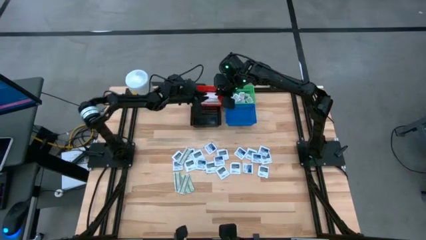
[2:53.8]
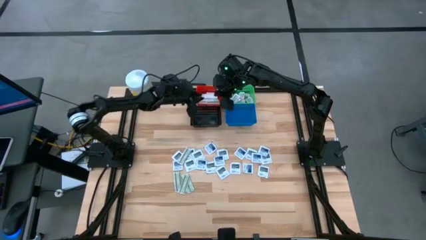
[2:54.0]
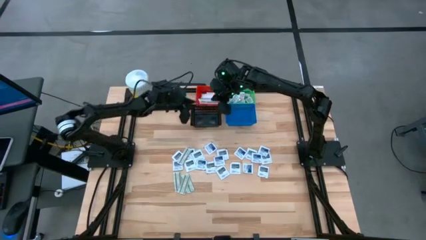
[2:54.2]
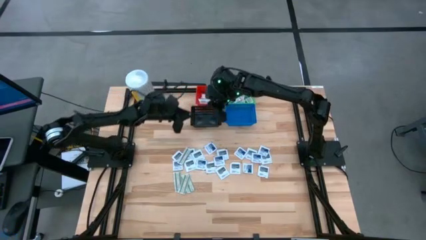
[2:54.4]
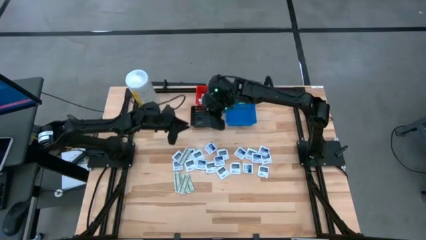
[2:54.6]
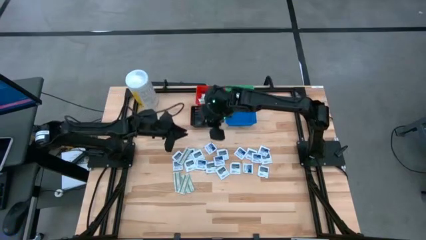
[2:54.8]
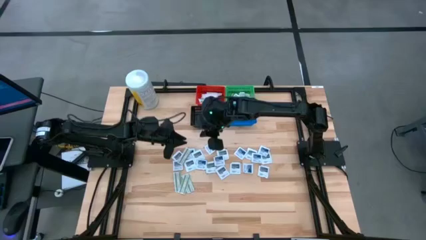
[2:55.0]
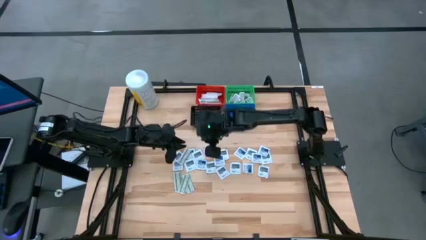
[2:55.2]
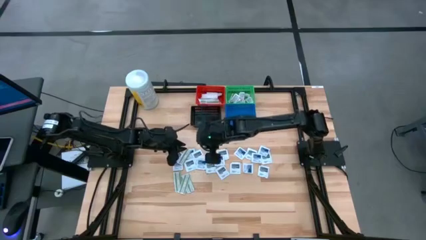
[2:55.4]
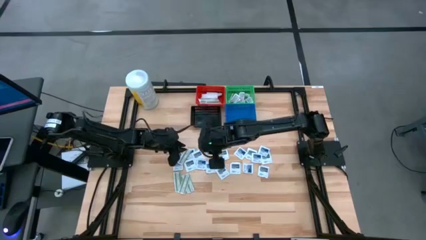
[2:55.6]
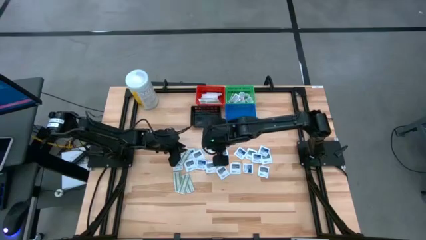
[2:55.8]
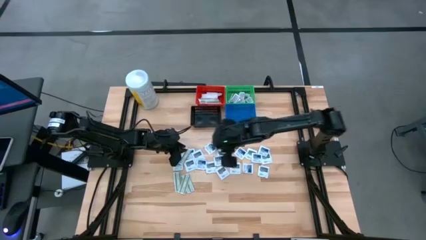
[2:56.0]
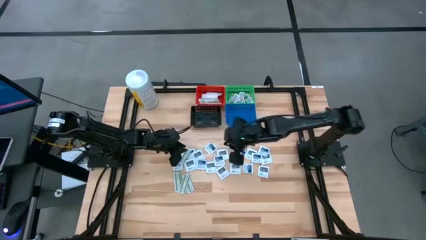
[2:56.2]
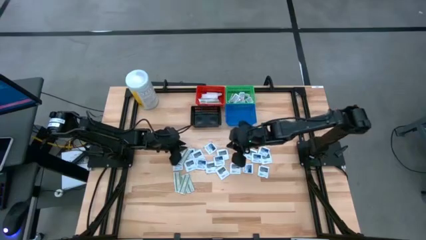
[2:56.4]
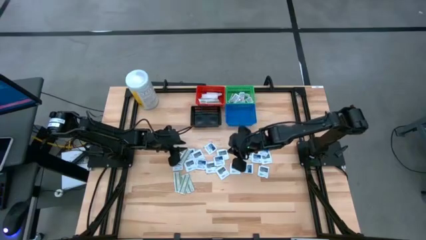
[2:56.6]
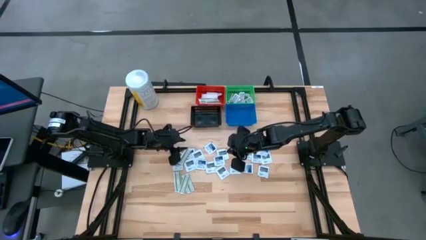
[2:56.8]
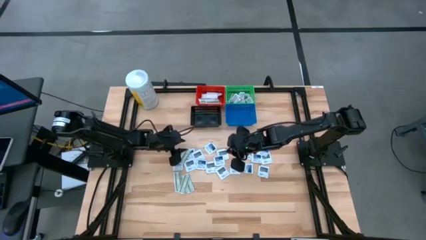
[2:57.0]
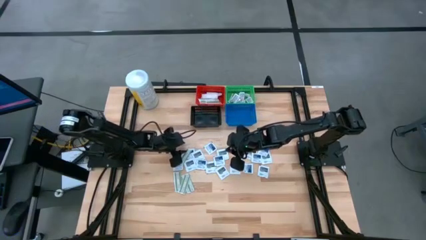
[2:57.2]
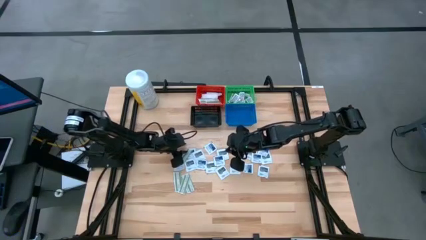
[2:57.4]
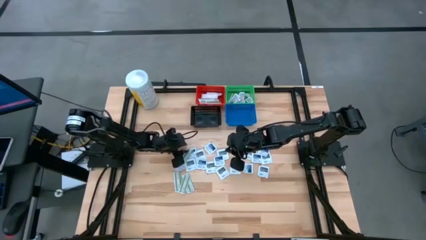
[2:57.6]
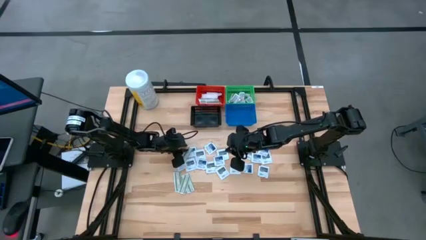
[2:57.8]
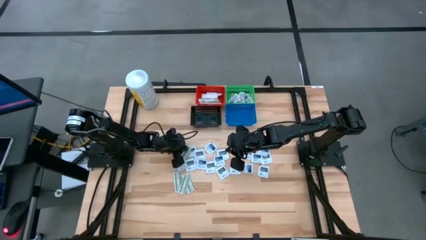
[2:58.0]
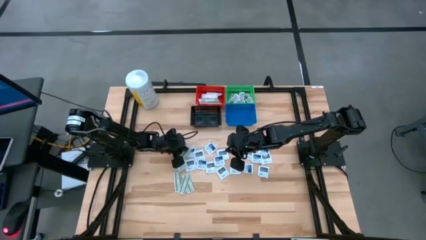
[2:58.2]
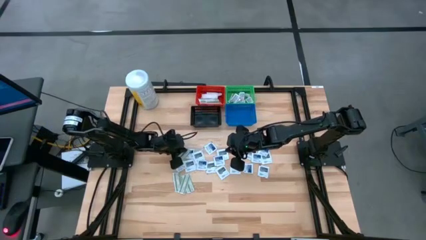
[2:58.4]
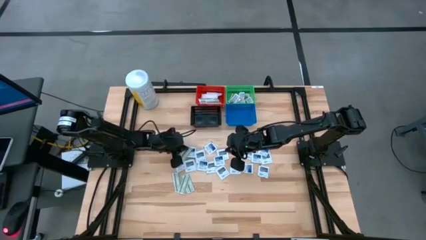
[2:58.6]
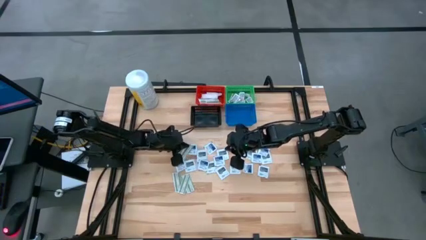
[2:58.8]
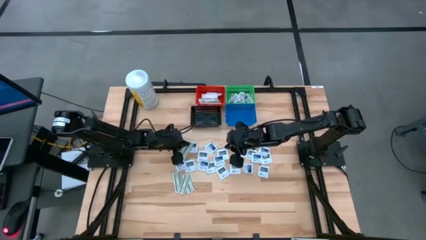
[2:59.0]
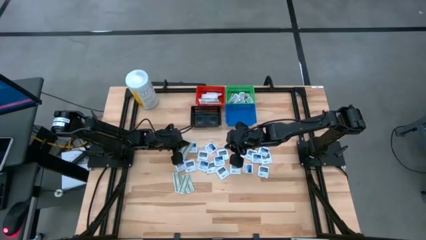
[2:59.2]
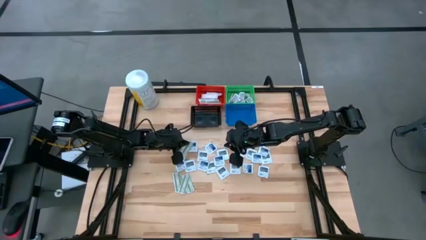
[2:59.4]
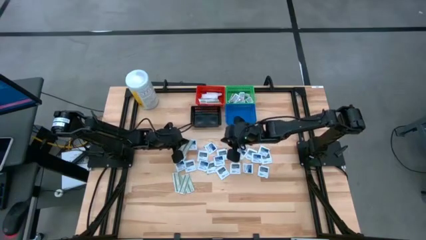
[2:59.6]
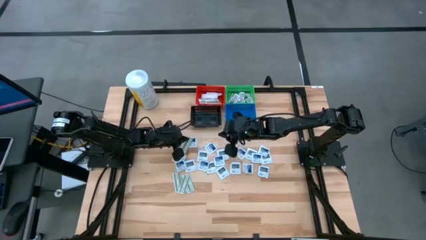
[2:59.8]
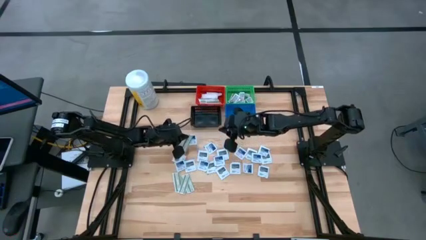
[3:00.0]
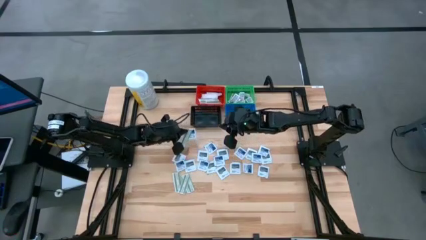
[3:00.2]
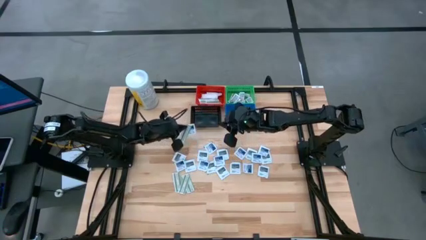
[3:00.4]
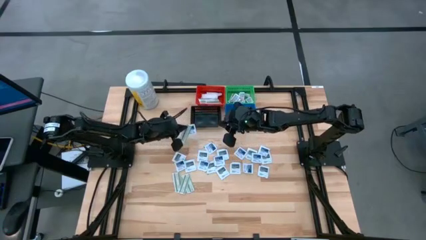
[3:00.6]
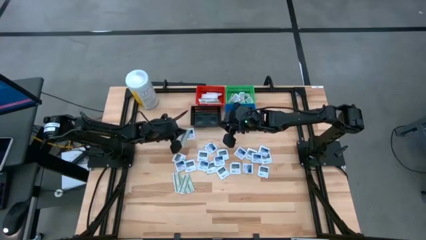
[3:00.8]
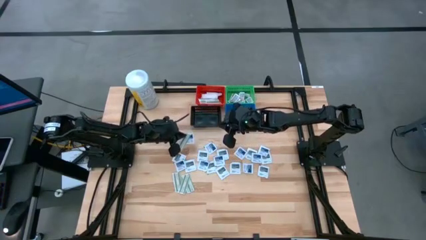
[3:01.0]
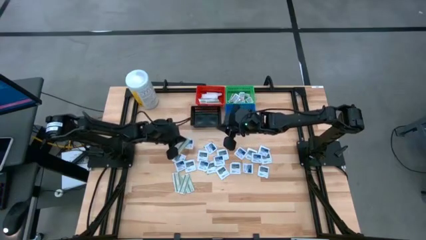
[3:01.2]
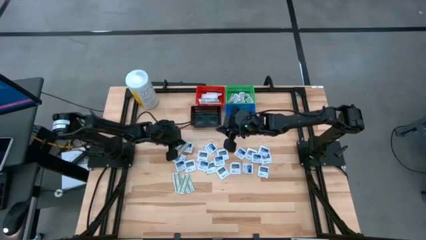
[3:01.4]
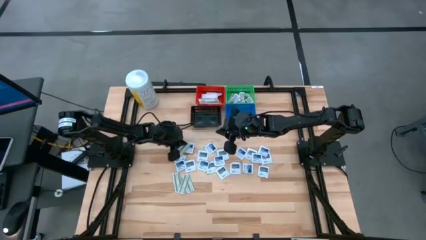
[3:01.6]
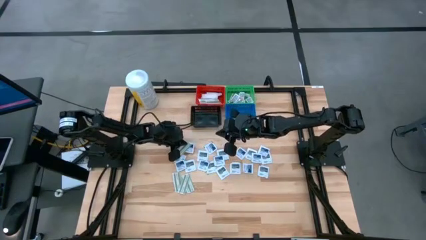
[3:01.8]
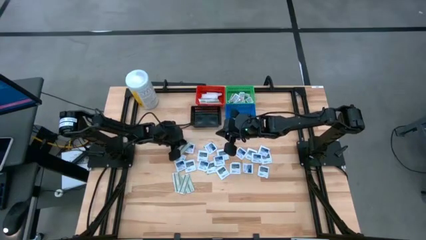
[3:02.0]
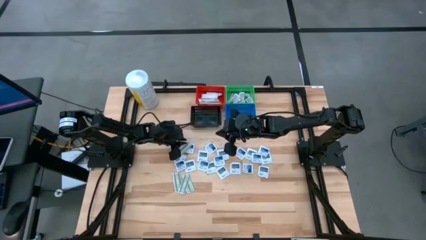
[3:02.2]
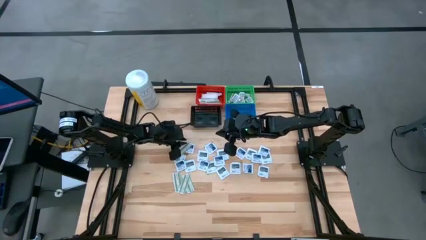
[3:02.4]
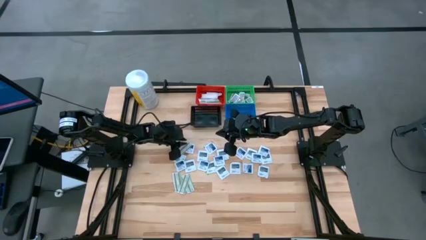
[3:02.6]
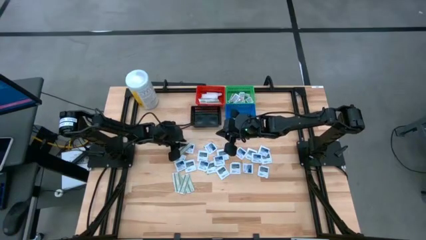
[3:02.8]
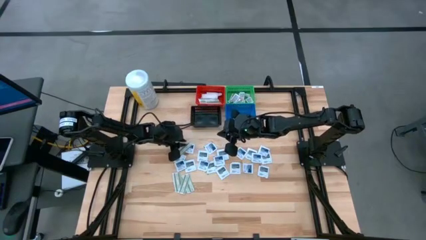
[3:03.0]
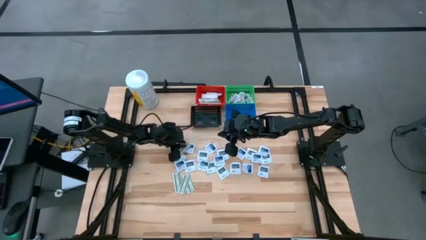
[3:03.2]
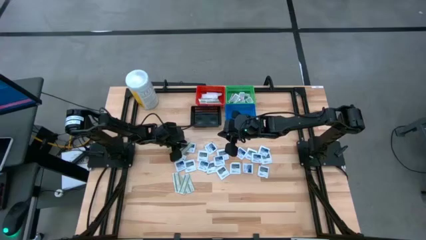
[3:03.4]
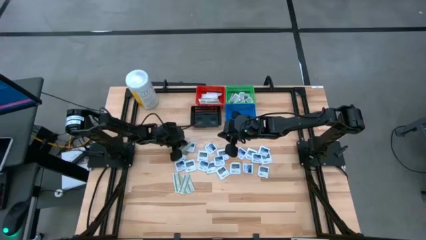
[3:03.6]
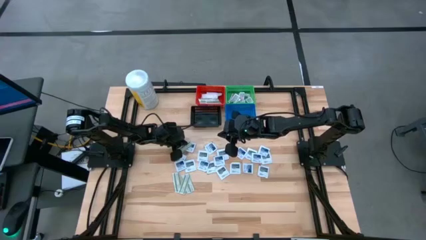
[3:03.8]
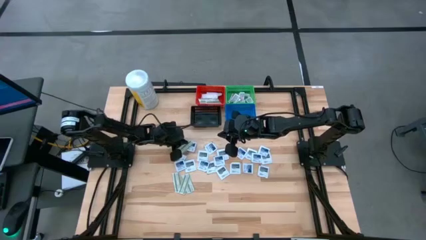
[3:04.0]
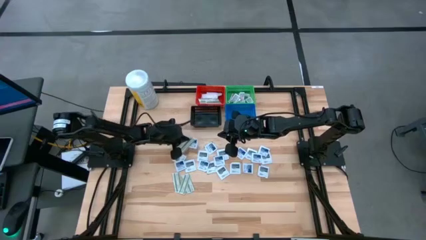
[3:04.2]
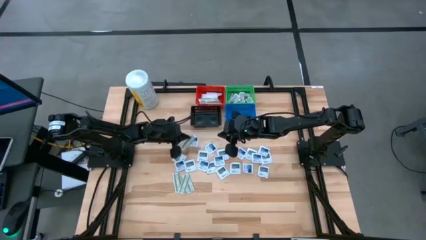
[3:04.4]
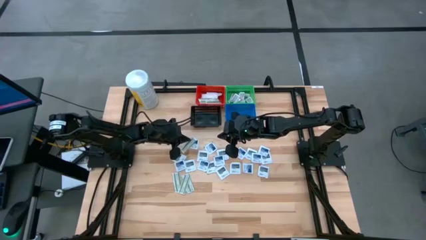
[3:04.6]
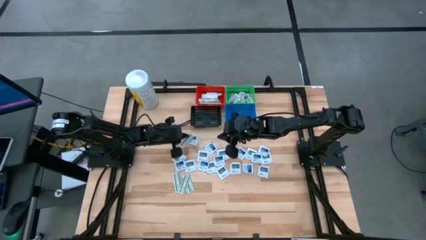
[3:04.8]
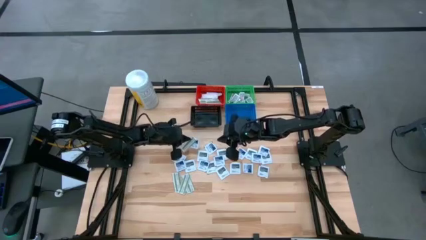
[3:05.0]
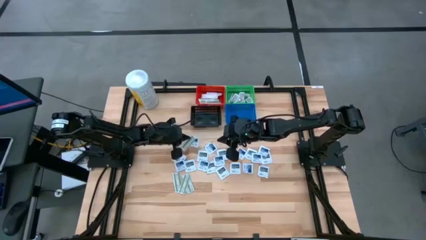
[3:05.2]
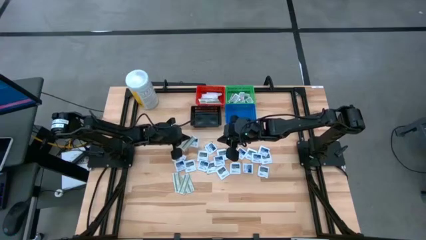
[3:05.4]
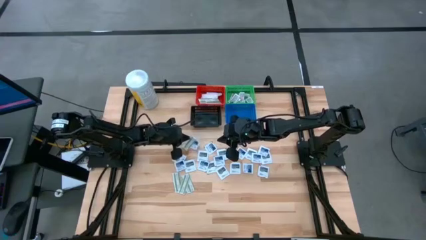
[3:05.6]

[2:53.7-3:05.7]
Task: Pick & Place First Aid Supplies
Put the bandage into the red basket

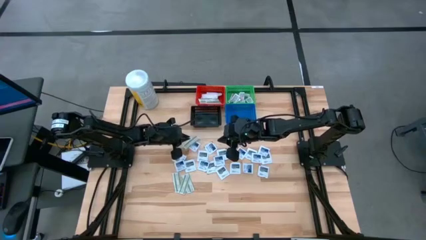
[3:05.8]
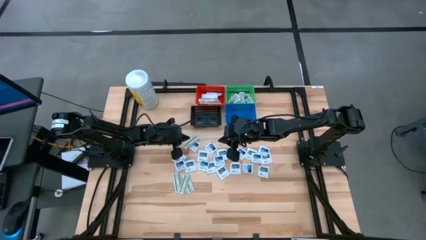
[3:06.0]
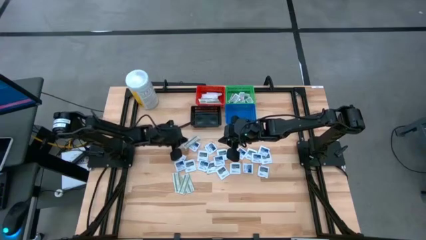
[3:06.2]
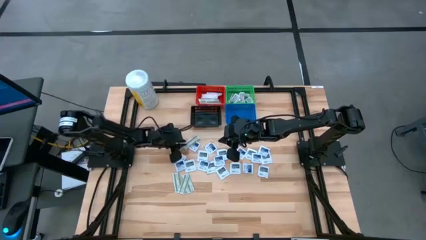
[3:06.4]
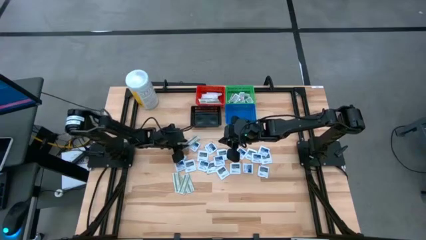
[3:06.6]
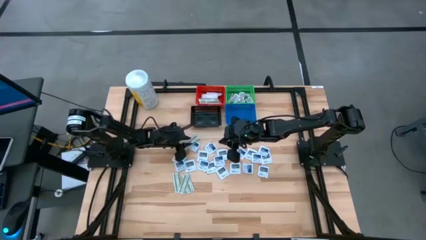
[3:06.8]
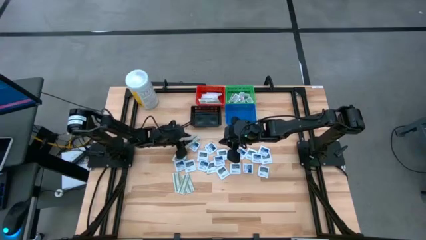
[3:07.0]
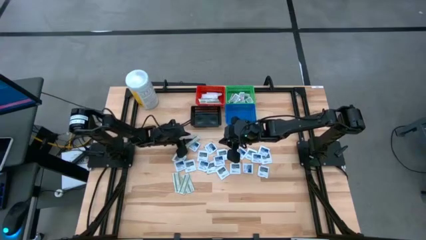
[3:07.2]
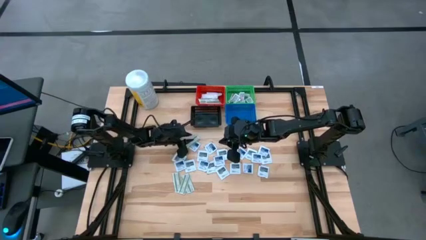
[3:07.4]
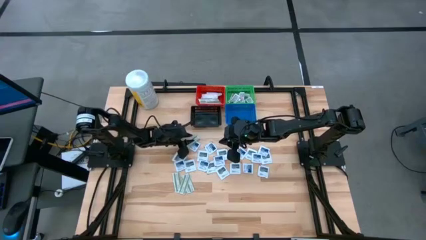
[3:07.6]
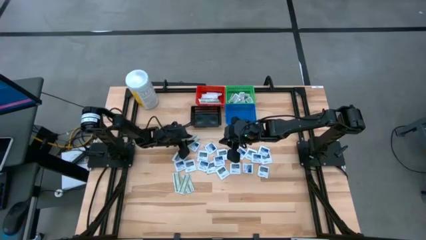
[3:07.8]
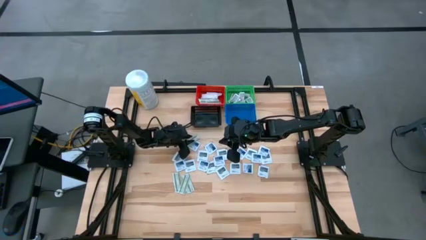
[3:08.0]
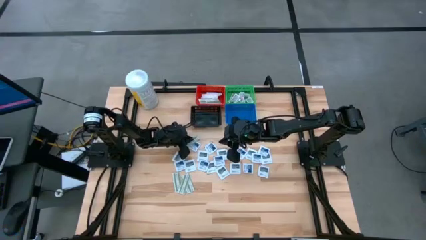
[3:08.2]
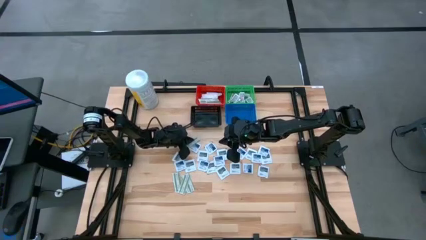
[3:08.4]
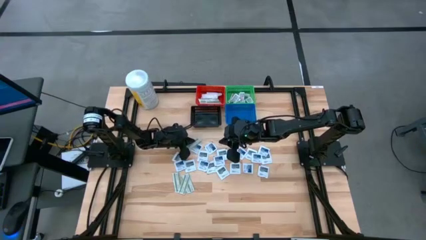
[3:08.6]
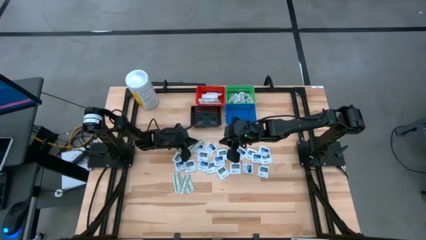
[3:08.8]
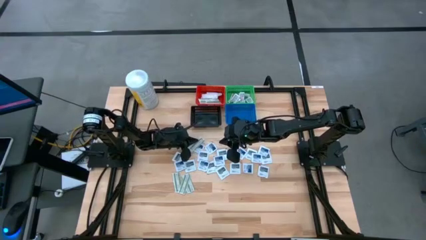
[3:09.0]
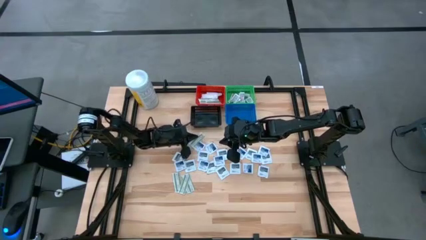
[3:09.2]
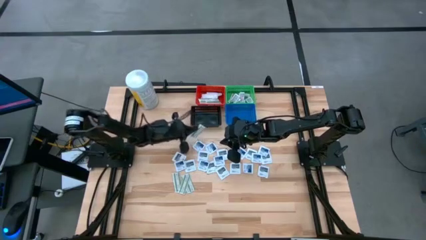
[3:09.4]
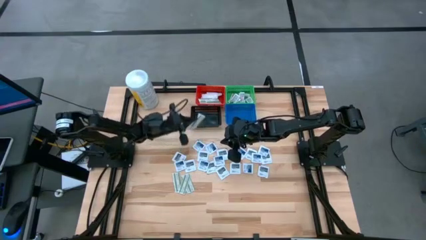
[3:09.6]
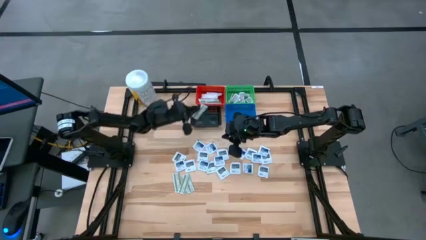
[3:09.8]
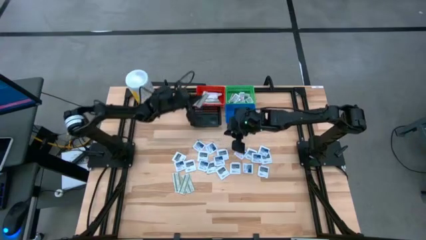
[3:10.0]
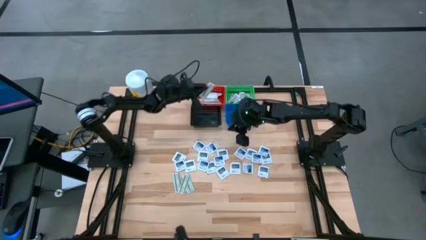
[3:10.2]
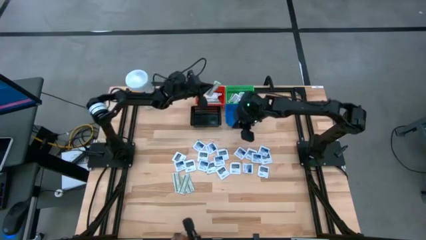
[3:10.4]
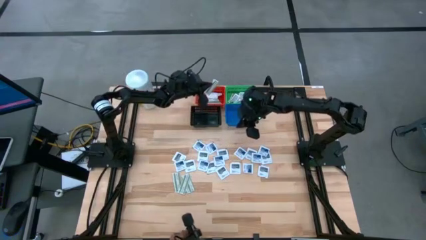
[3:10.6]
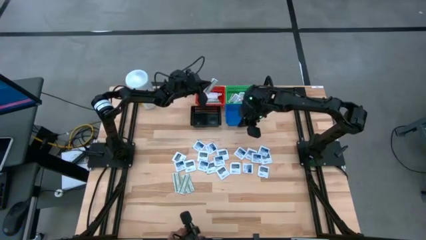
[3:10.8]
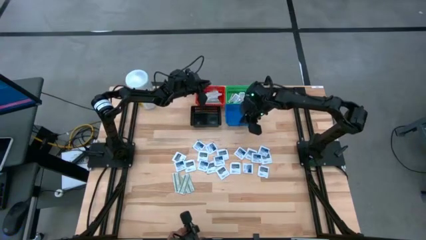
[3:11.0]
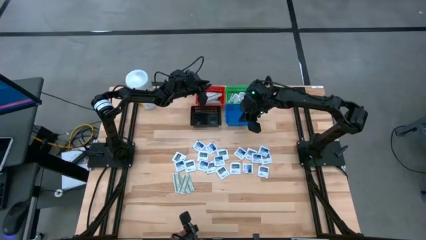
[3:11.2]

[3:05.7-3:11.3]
Put the bandage into the red basket
